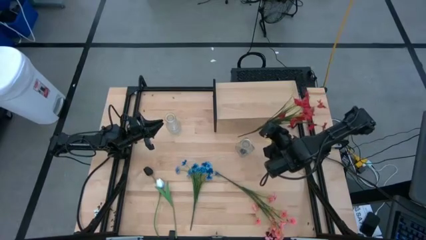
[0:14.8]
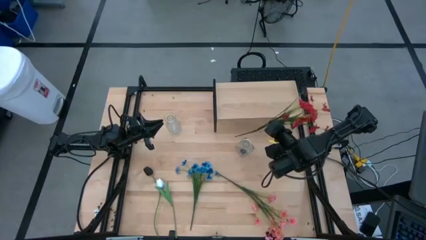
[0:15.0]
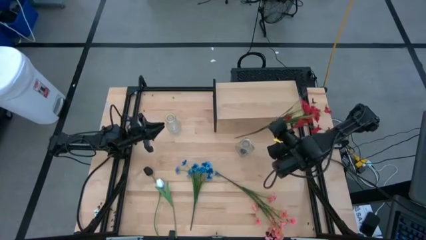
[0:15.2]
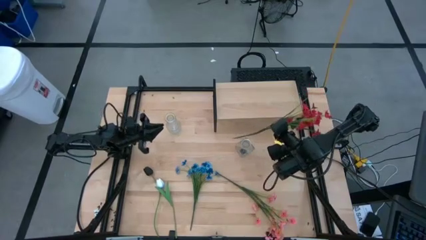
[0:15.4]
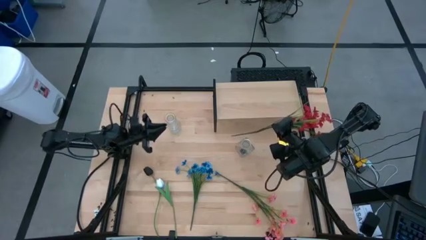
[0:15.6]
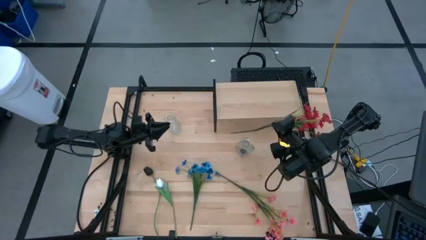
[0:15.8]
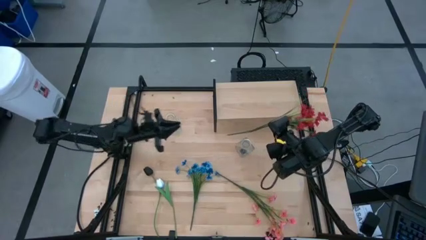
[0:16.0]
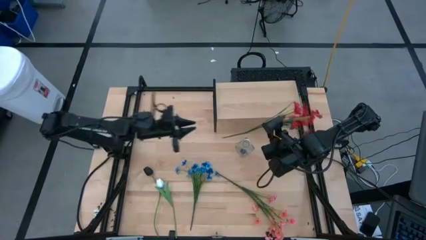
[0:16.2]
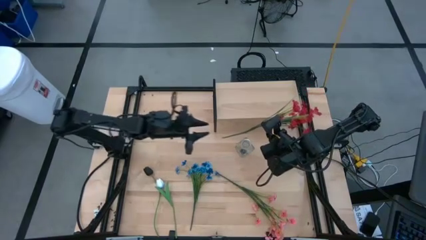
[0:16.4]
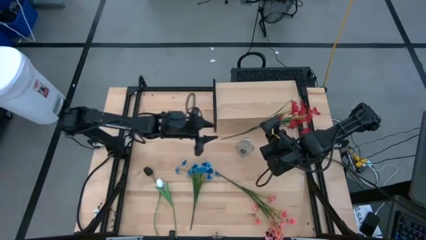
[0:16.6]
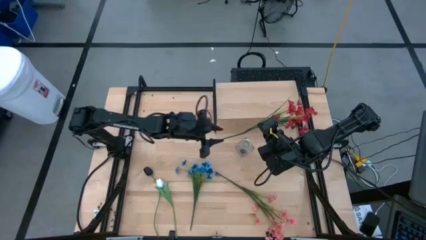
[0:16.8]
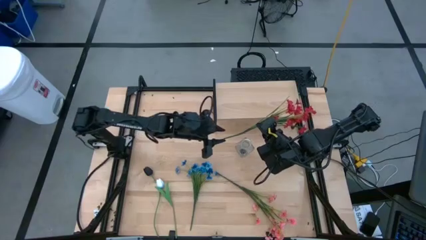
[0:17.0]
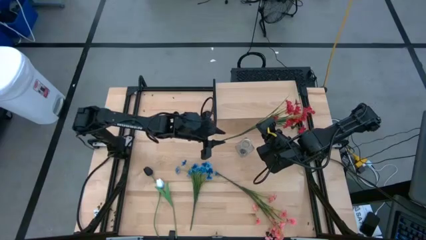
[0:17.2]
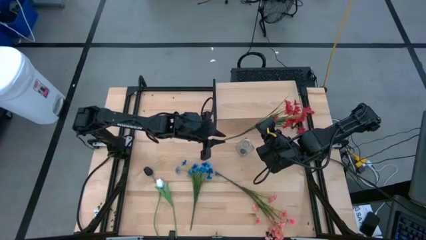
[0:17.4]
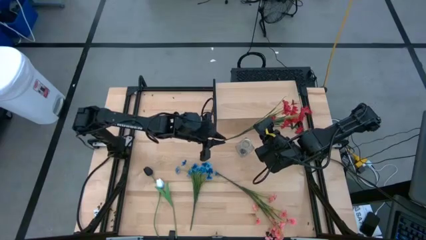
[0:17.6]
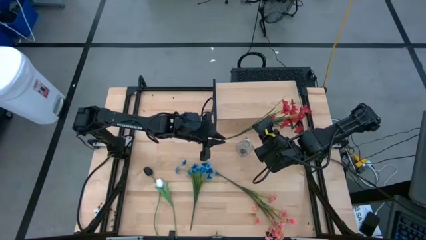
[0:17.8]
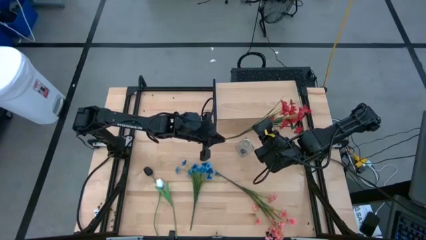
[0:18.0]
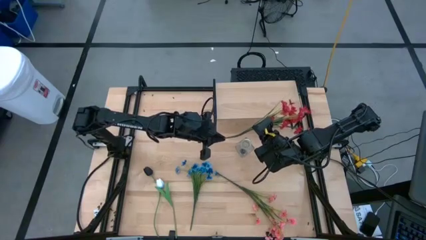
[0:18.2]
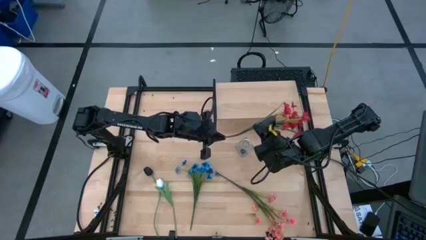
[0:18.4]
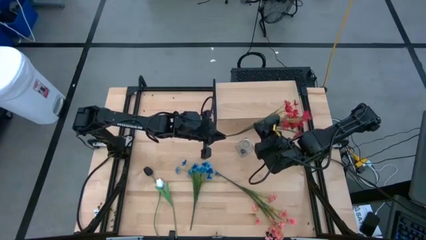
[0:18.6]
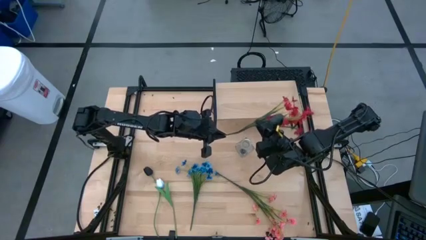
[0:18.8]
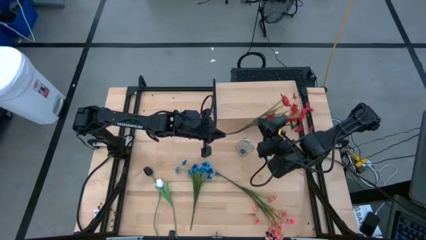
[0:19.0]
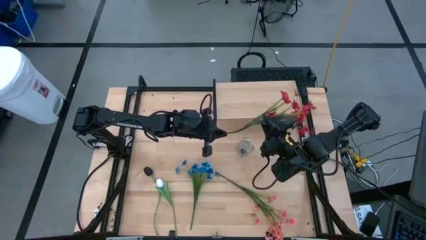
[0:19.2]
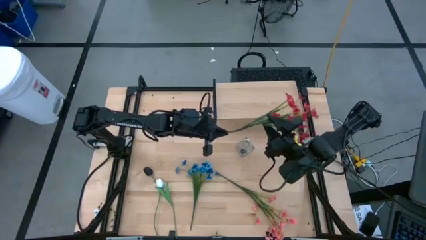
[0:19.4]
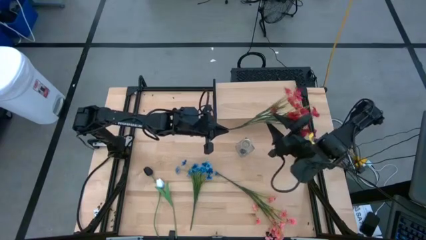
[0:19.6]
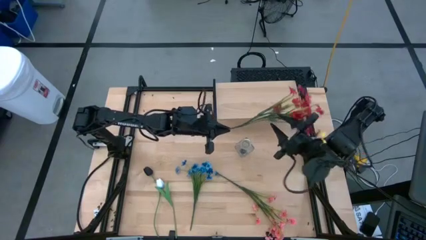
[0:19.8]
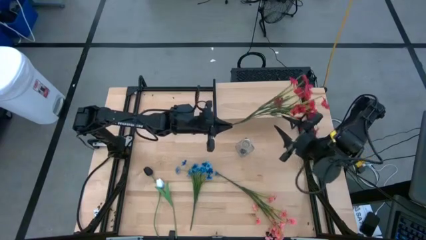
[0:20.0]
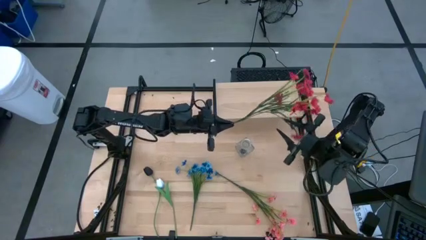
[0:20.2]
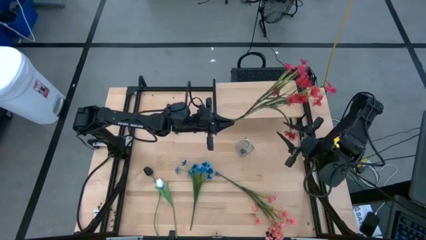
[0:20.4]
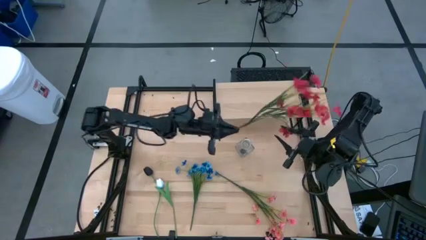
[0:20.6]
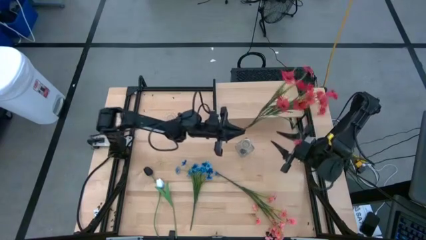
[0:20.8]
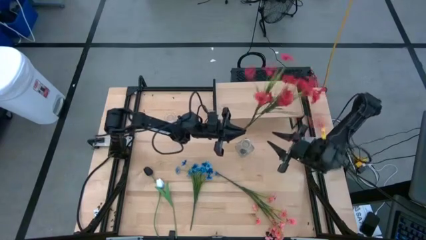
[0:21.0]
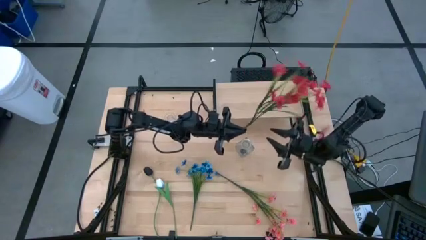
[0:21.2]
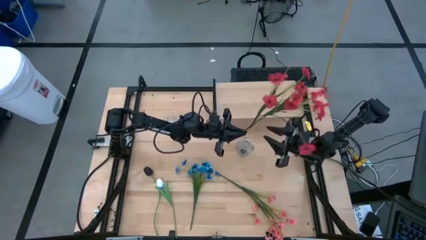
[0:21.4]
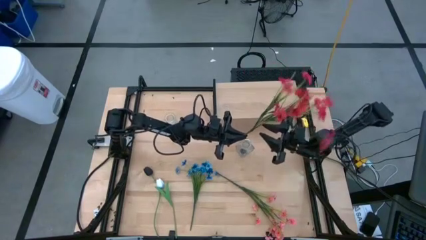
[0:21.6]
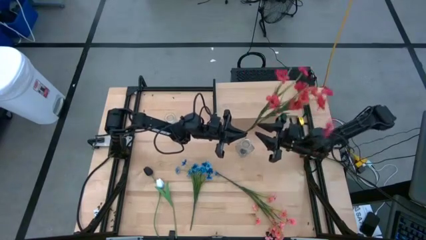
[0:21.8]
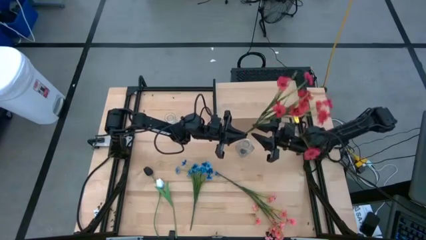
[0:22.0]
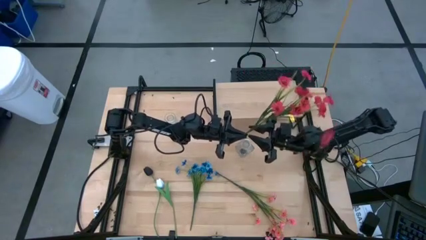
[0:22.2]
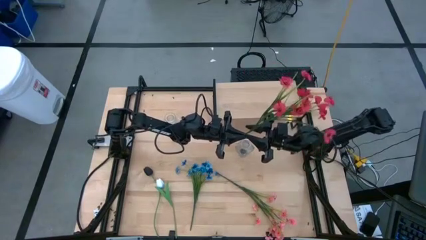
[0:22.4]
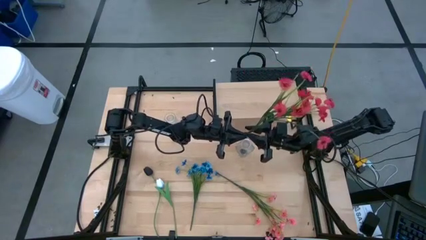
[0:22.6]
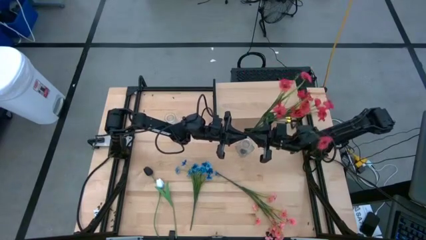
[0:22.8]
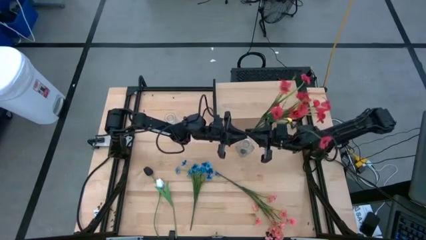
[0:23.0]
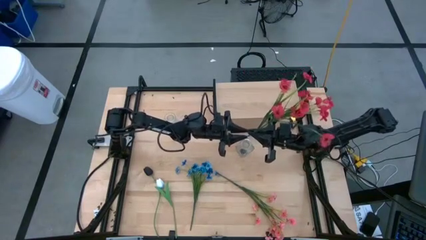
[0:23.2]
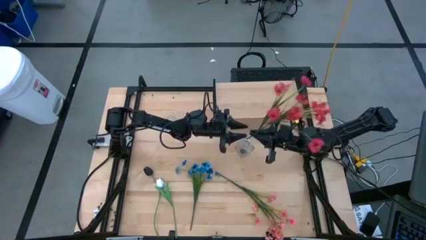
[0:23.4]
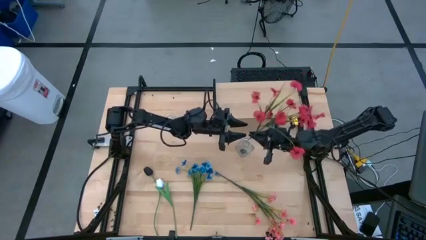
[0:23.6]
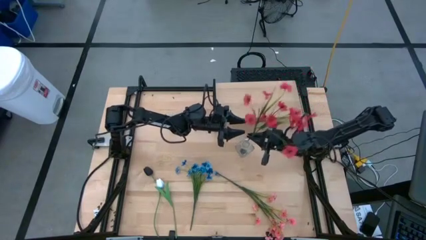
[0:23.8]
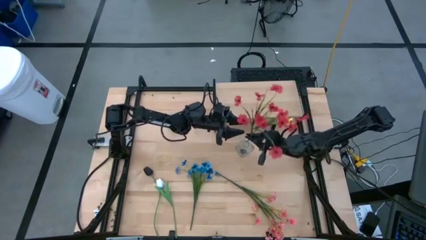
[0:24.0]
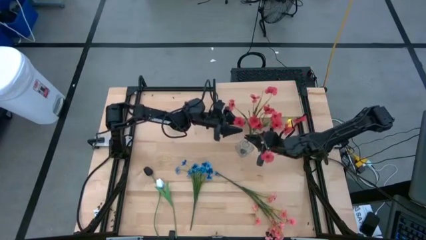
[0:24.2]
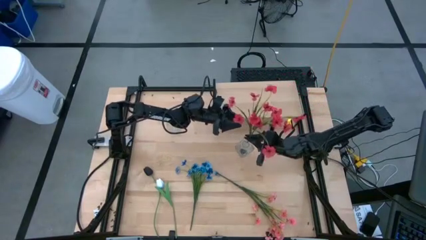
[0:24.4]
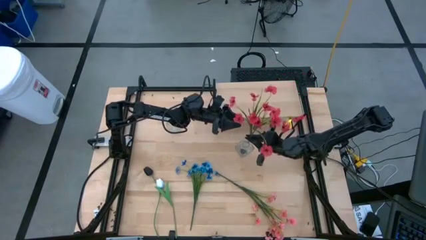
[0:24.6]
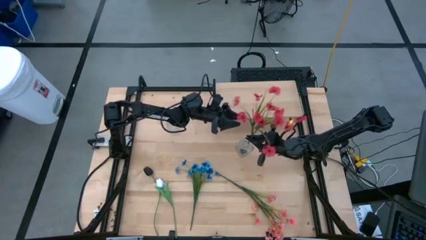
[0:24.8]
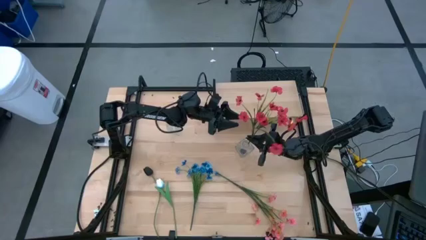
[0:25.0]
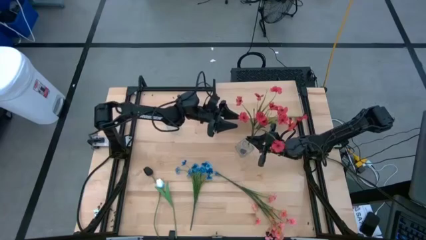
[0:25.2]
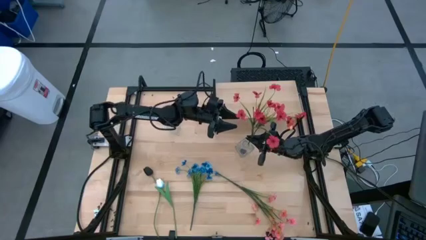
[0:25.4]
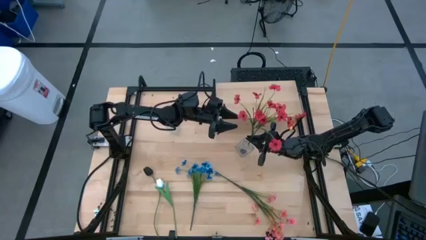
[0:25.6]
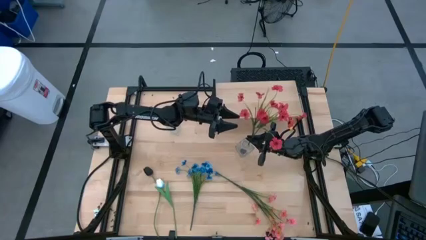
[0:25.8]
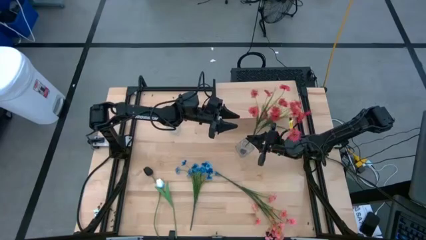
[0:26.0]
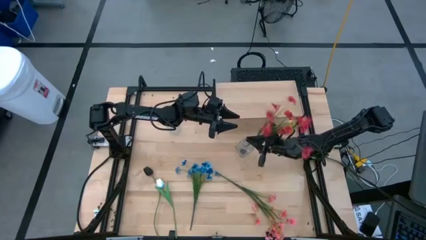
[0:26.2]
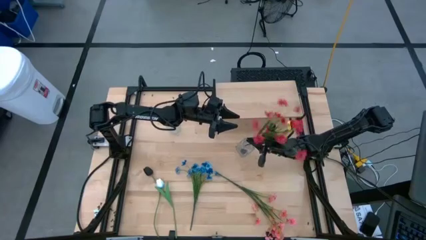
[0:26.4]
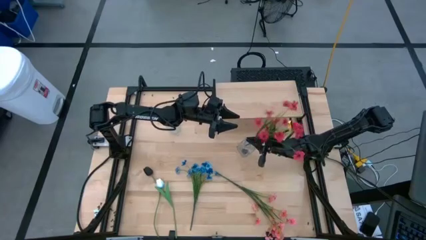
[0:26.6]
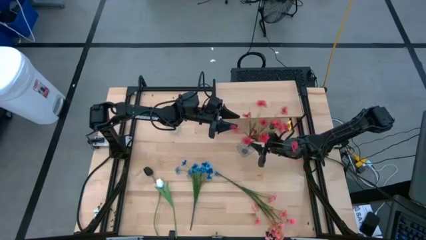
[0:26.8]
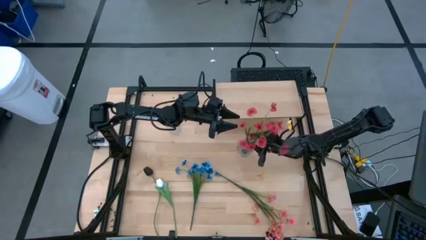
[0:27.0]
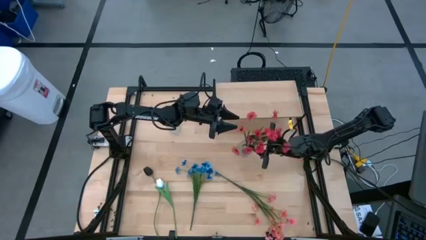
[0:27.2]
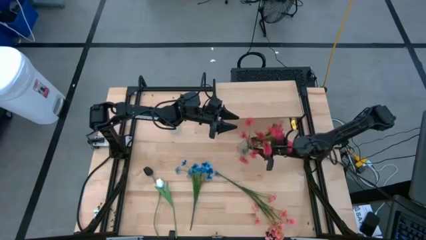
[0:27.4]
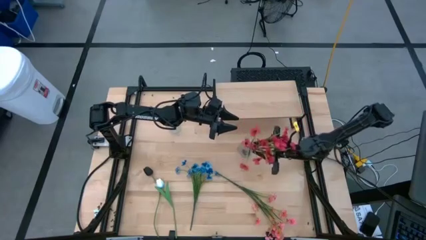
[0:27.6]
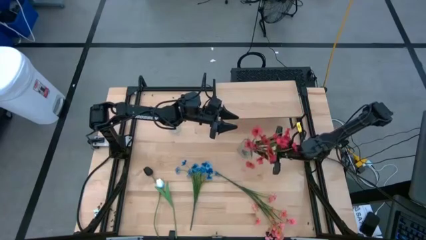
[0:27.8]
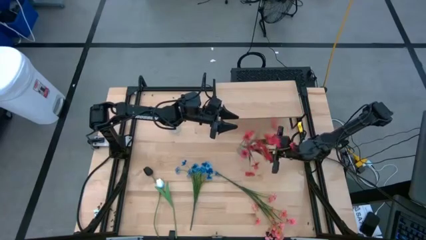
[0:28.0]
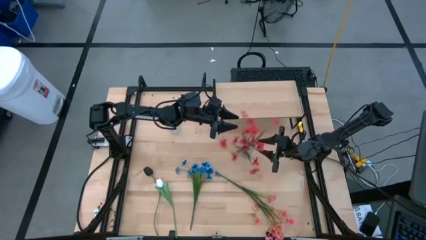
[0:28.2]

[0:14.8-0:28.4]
Task: Pick and place flowers into a vace then onto a shelf
Put the red flowers into the right transparent vase
